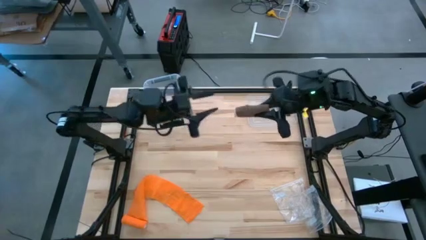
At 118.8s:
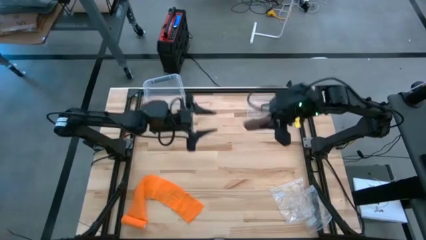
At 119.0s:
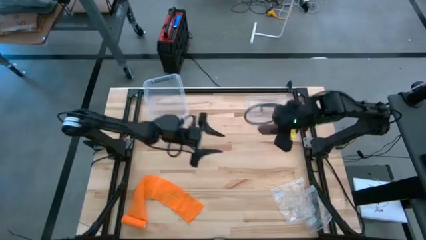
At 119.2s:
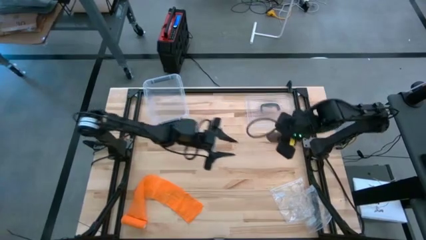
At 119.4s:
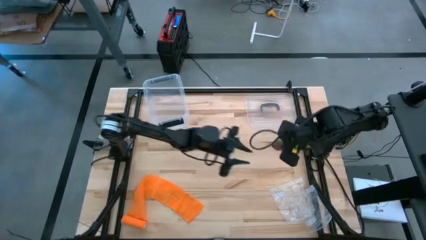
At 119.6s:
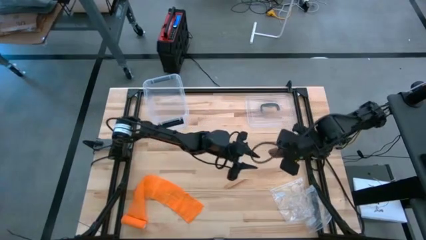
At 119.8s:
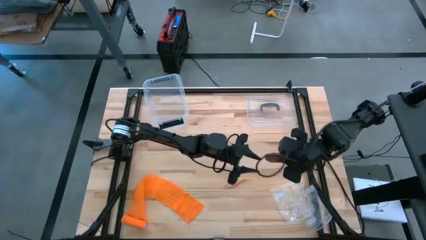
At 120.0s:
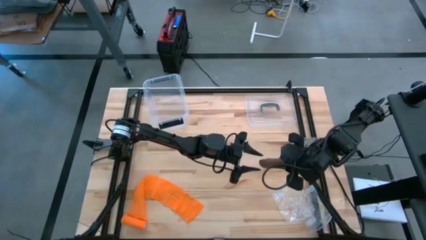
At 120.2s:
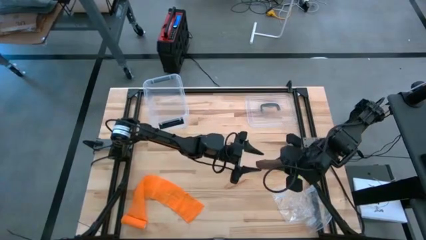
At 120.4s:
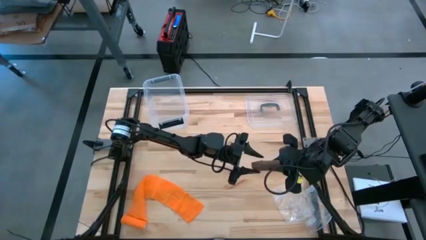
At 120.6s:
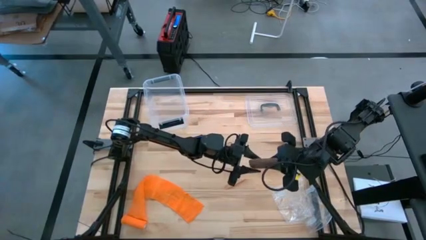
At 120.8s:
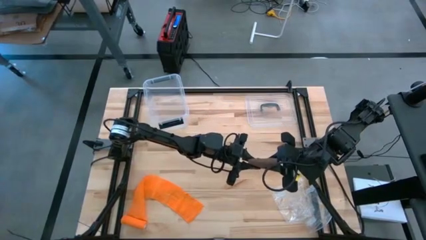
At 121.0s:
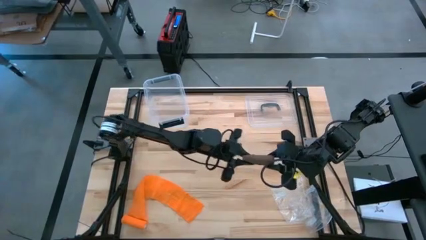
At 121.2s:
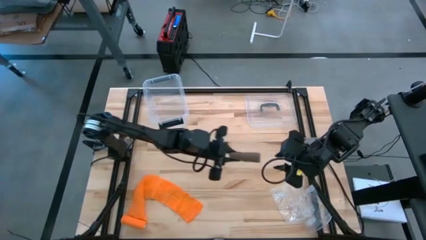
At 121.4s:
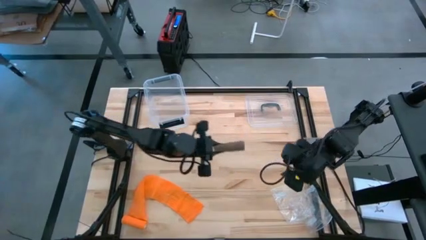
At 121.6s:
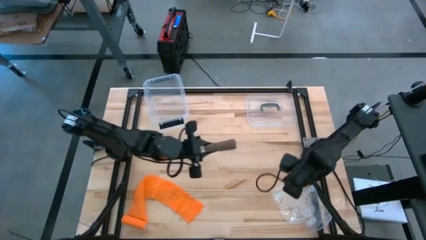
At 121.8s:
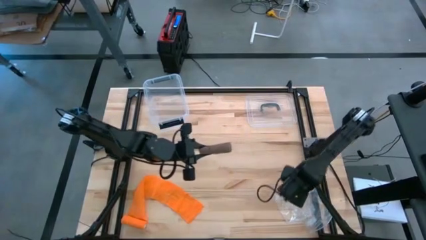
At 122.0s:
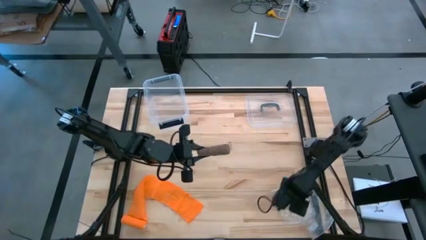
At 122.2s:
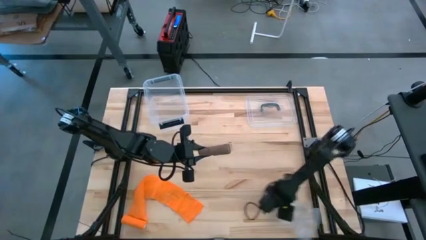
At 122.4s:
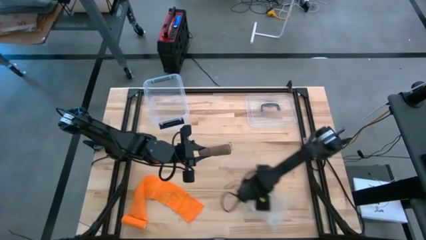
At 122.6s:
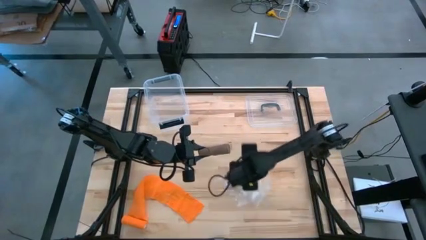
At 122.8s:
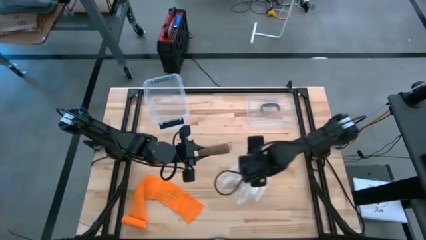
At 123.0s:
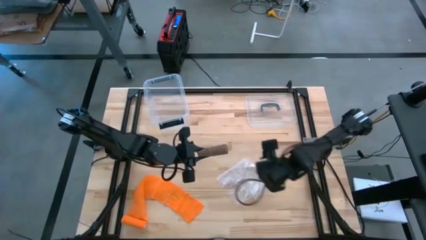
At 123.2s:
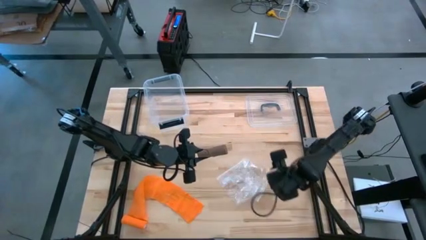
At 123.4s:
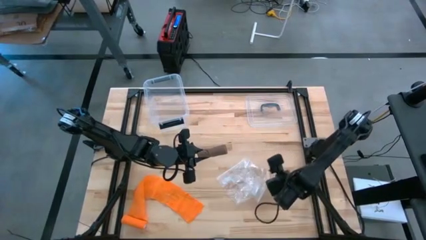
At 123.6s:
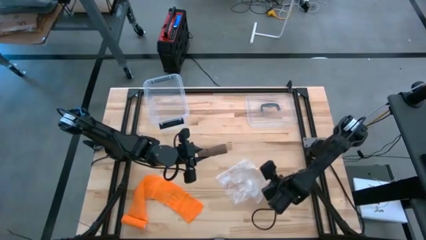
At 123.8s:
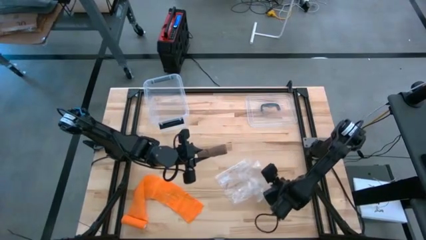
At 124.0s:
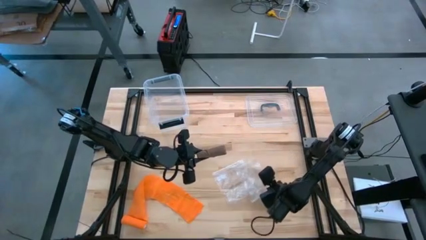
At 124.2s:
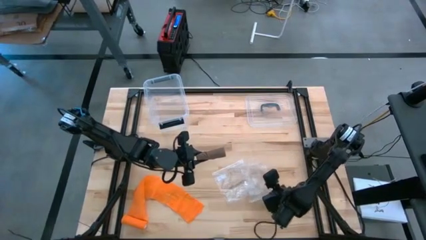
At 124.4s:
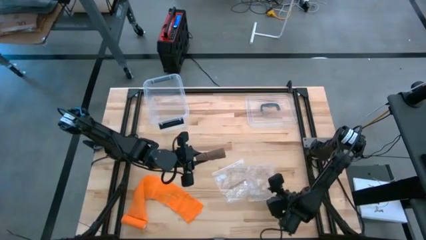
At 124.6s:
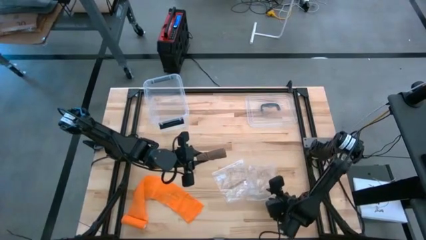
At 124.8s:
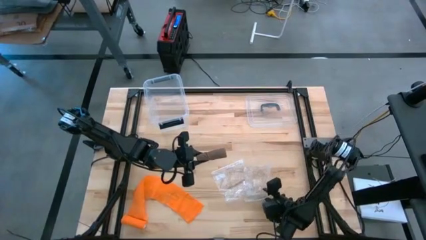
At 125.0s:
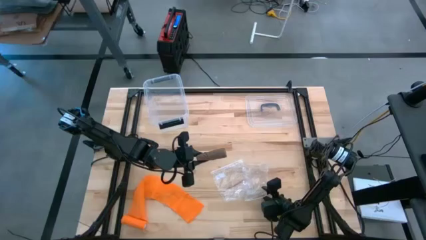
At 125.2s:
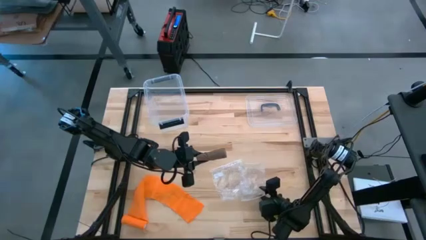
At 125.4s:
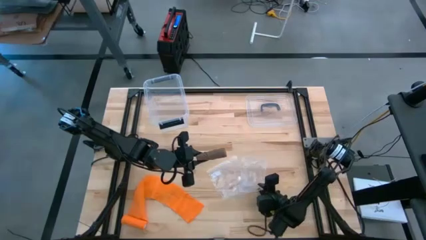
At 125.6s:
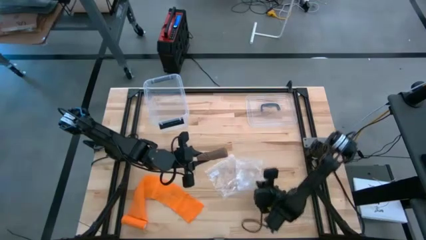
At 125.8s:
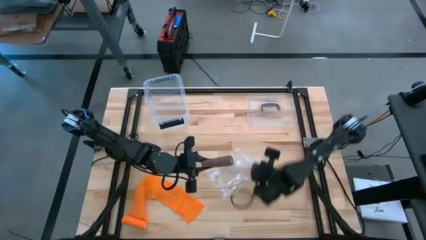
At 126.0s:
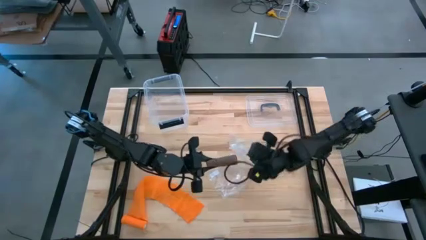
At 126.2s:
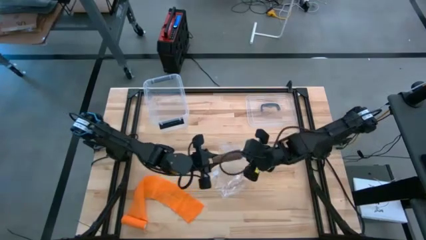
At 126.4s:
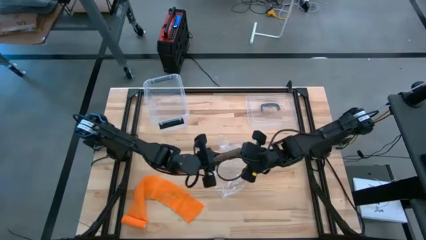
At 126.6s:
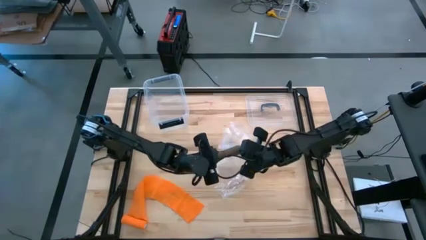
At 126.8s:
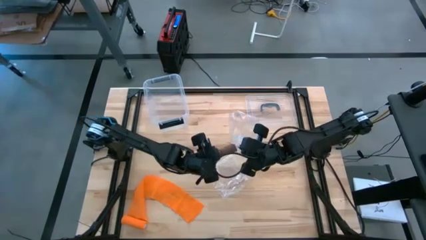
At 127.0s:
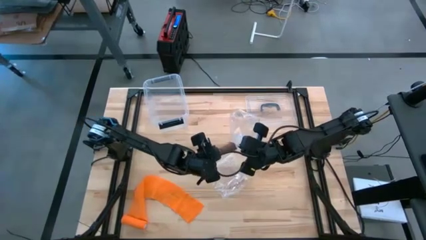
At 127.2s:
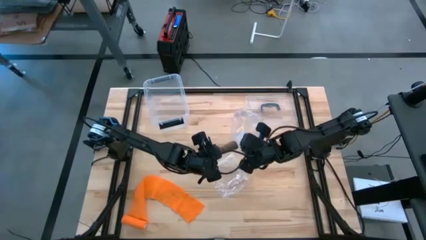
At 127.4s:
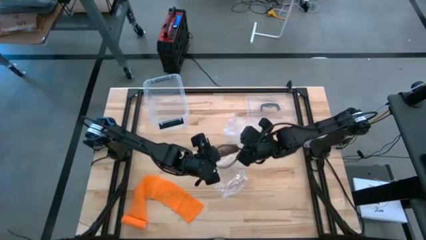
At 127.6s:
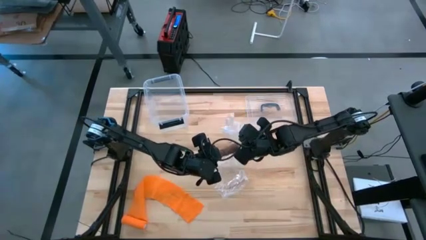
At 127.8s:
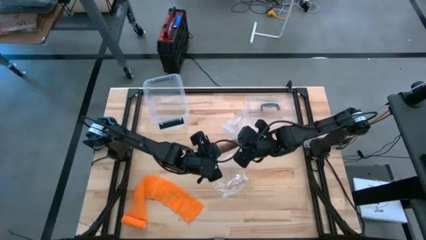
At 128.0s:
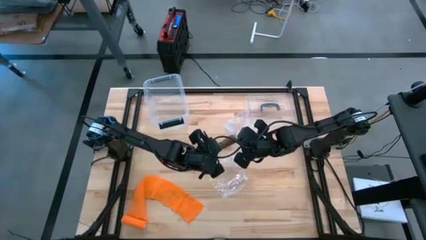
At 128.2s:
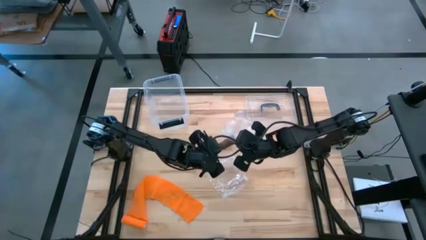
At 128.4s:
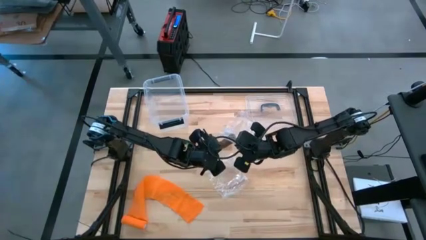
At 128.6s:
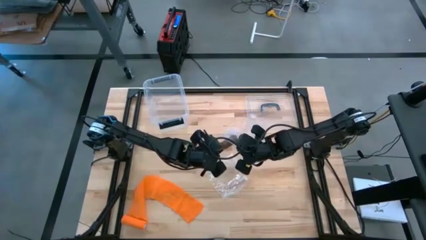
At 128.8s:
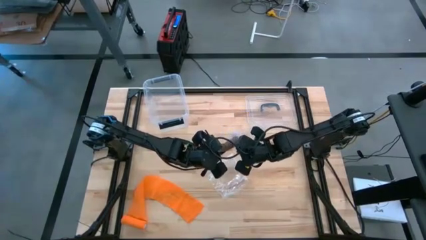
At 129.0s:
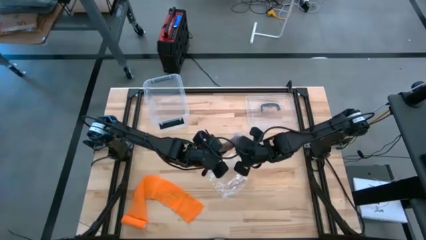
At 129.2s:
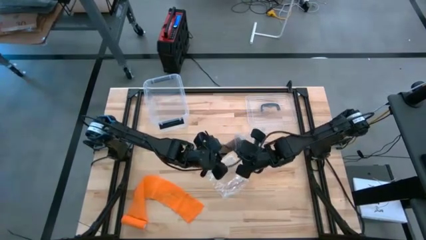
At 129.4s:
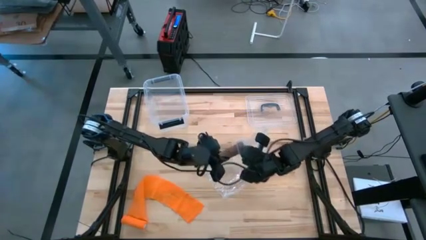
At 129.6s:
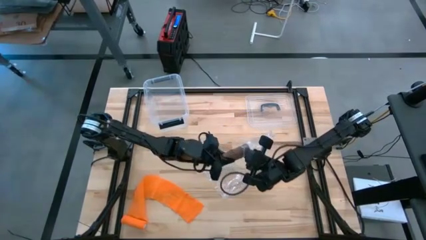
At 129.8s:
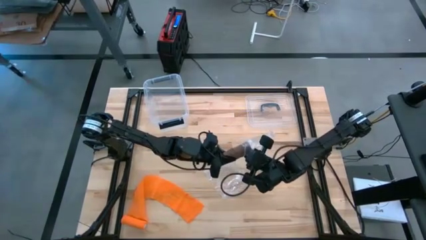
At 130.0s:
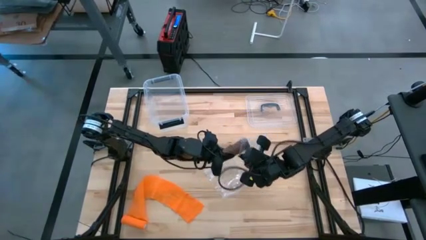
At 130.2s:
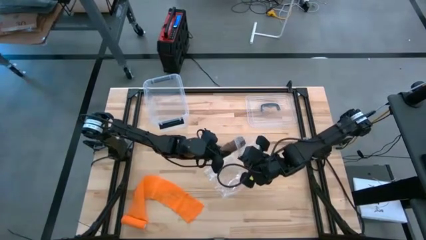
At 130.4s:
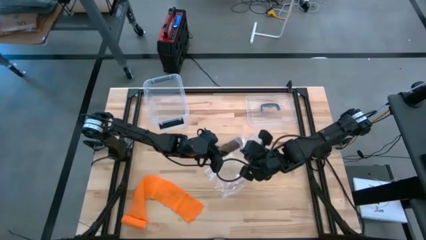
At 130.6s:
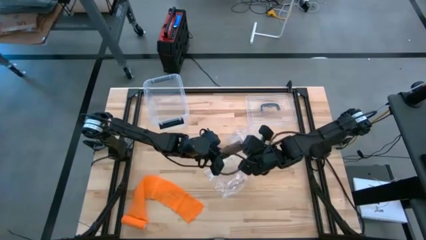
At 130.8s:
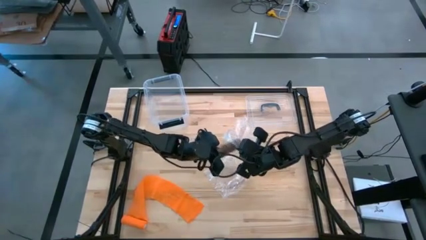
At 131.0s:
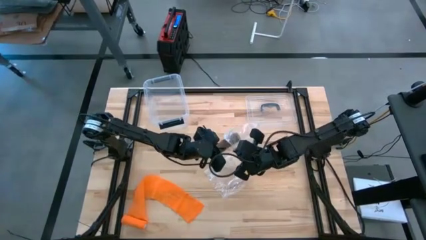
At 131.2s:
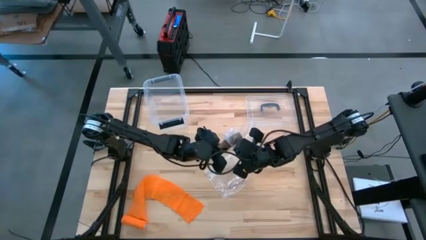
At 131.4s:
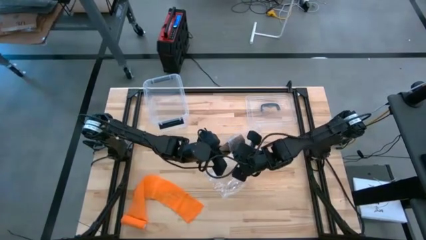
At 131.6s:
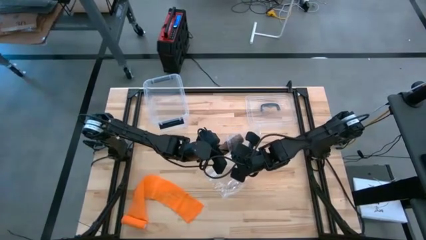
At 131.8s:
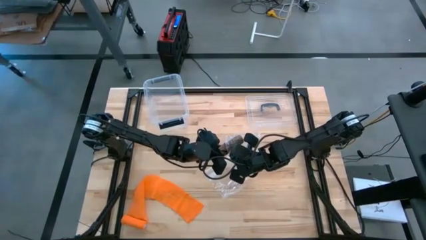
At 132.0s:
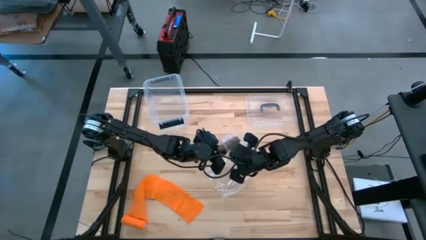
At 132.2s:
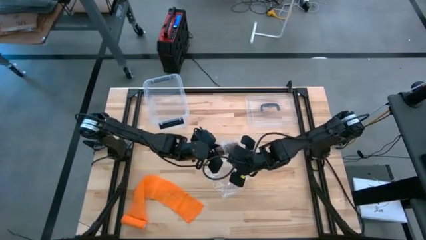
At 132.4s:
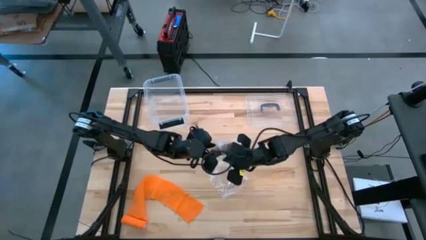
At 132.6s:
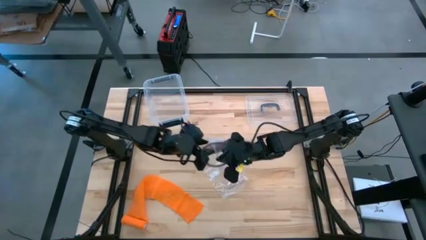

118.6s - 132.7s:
Task: Roll bandage
Put the rolled brown bandage into the right transparent zip bag
